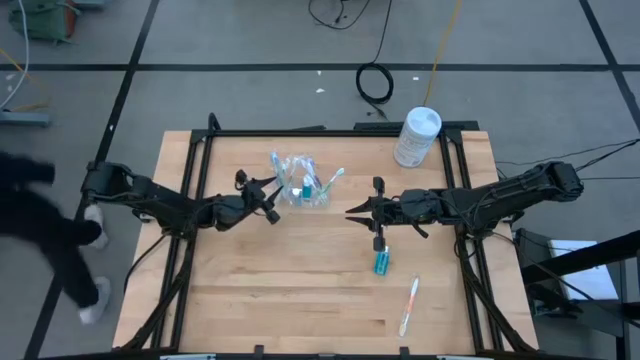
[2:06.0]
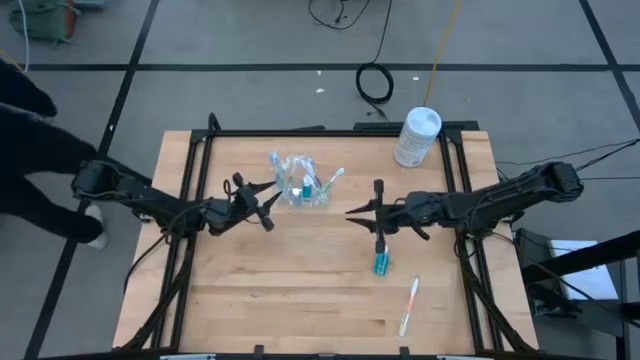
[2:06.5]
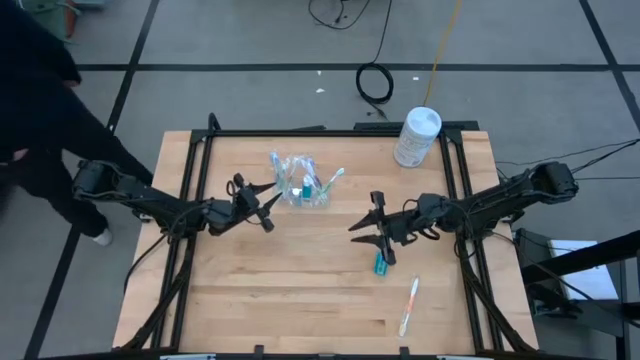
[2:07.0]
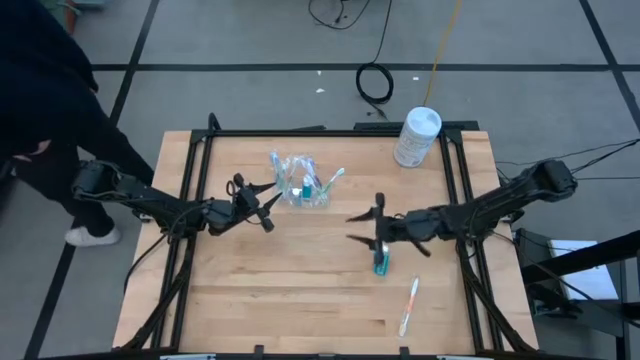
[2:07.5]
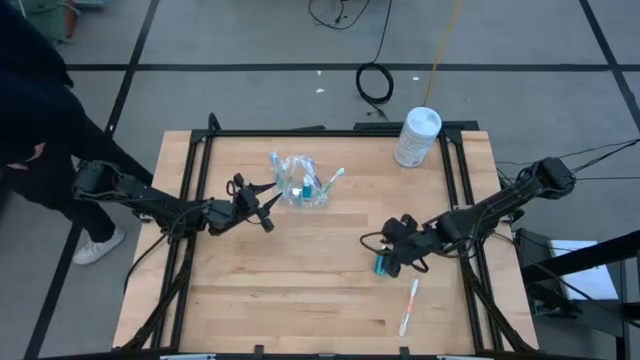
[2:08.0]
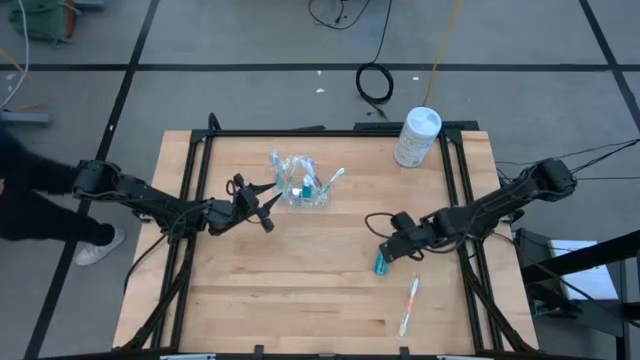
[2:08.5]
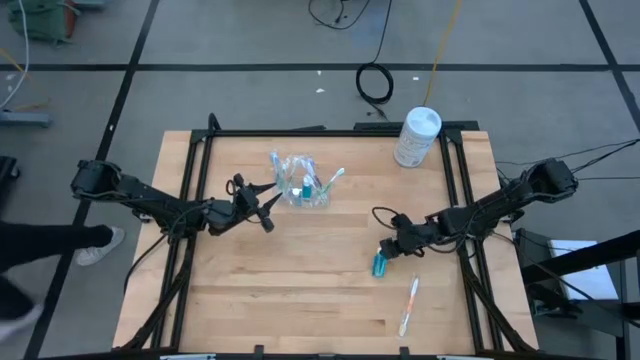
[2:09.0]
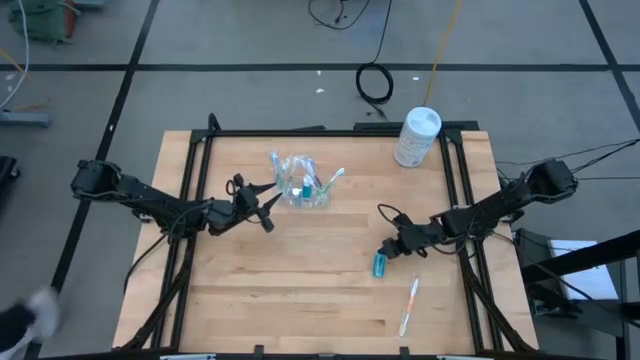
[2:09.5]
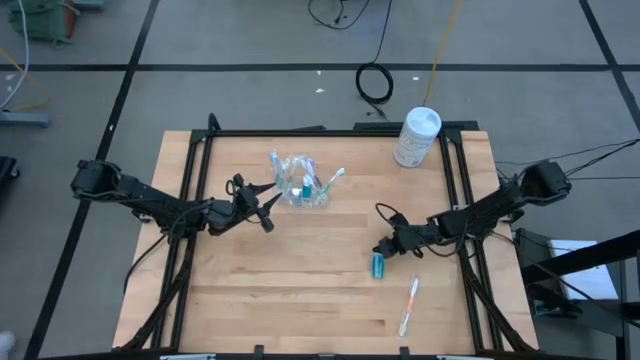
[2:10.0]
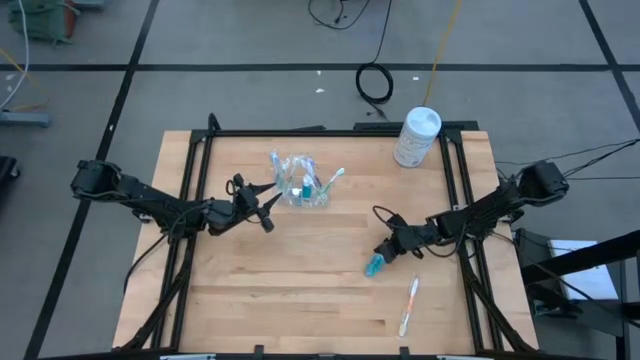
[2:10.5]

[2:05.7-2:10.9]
Task: Pick & Place toothbrushing station
Put the blue mouthwash into the transparent organizer

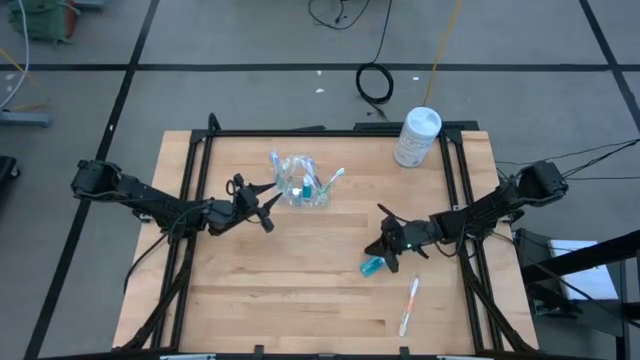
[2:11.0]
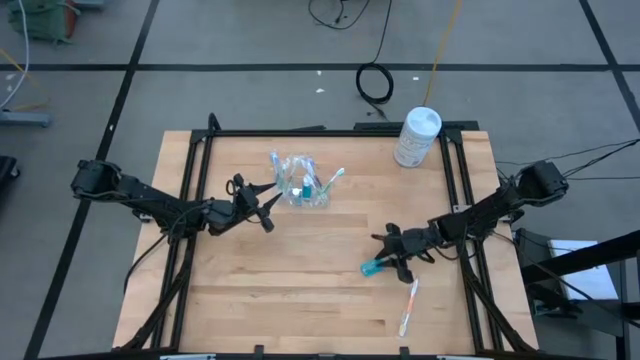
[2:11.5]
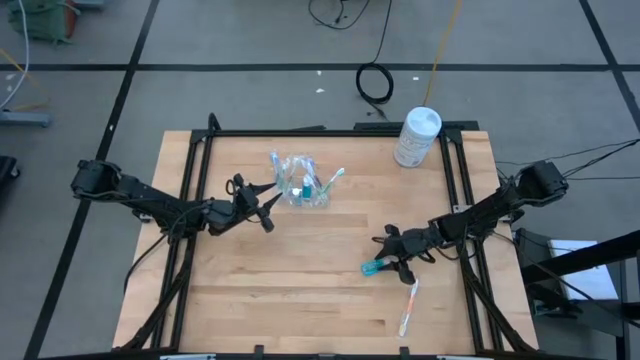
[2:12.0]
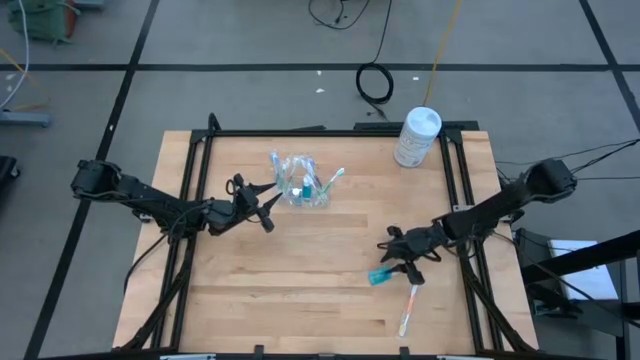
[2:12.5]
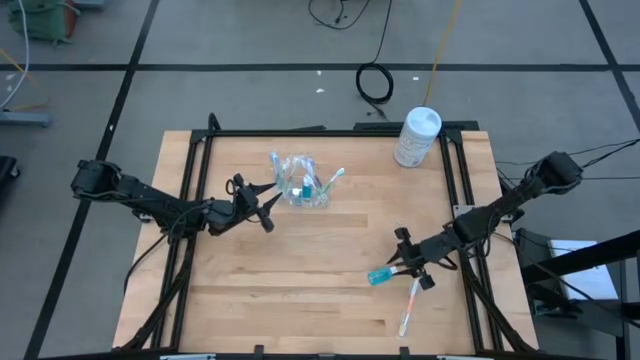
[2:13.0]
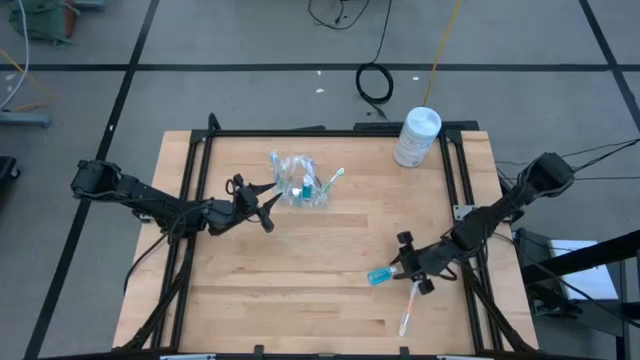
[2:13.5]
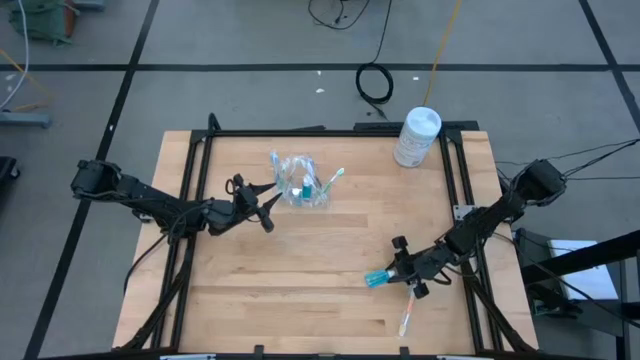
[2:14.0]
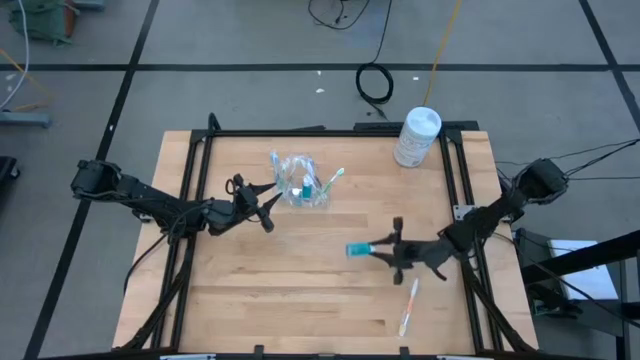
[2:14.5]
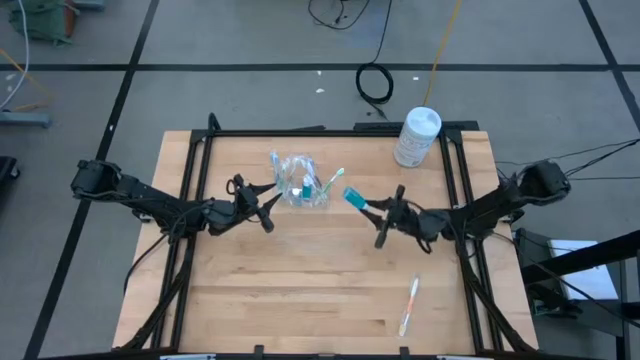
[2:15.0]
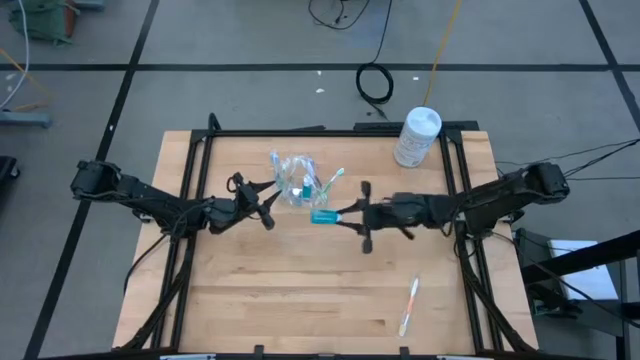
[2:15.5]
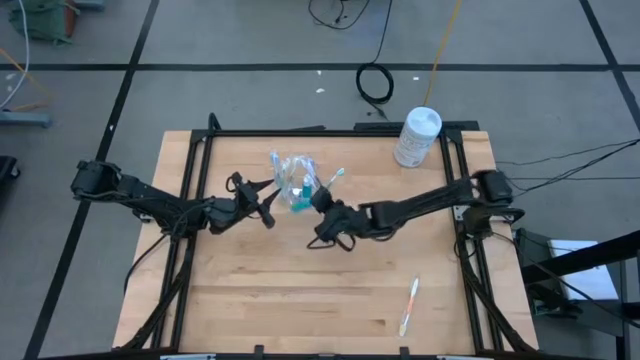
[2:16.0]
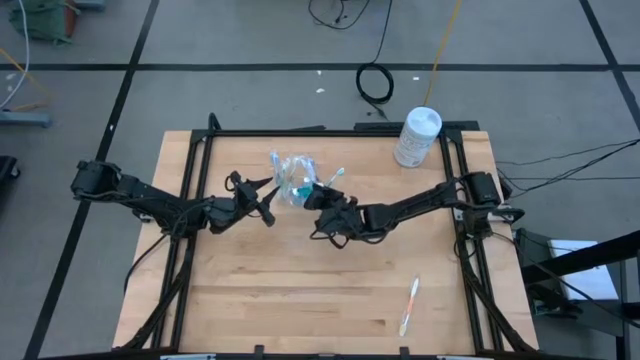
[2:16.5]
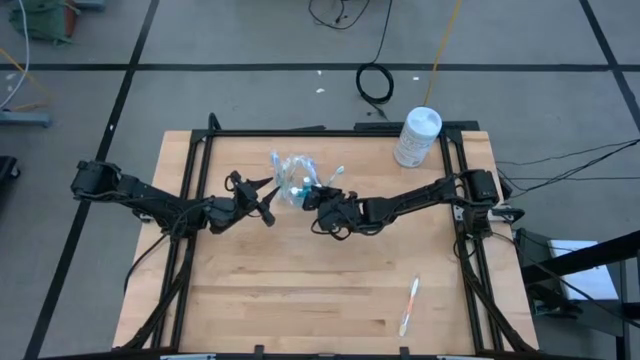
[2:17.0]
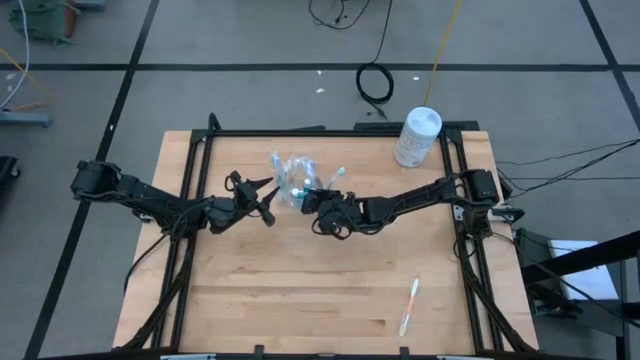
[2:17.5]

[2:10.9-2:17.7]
Put the blue mouthwash into the transparent organizer

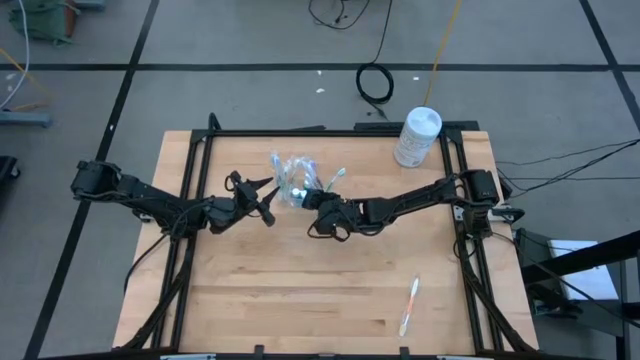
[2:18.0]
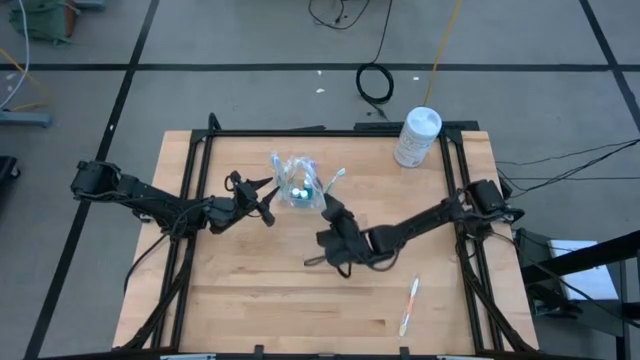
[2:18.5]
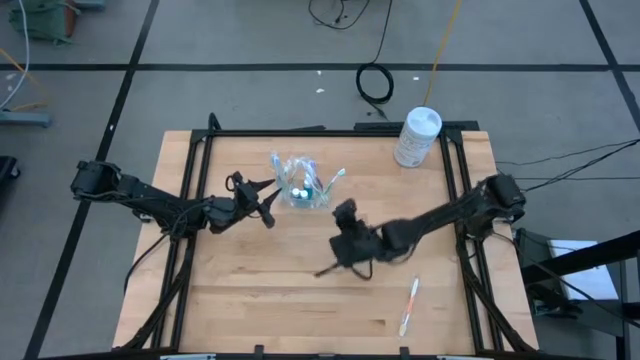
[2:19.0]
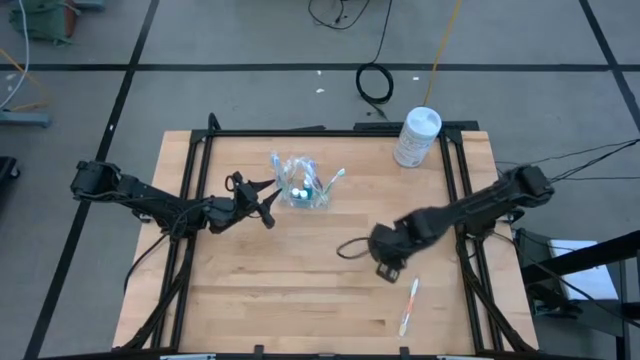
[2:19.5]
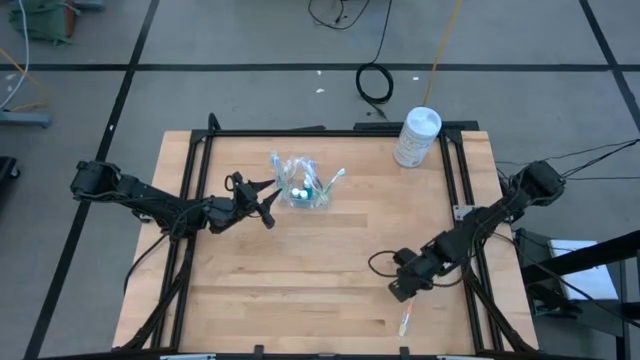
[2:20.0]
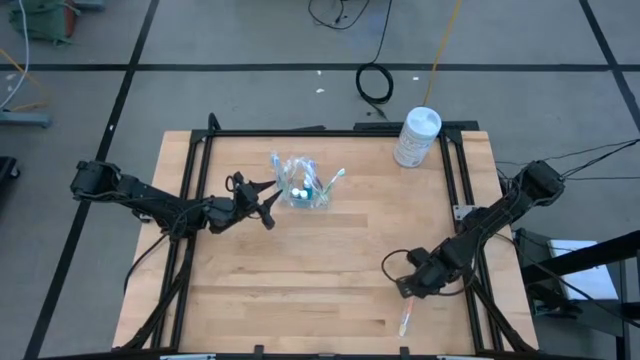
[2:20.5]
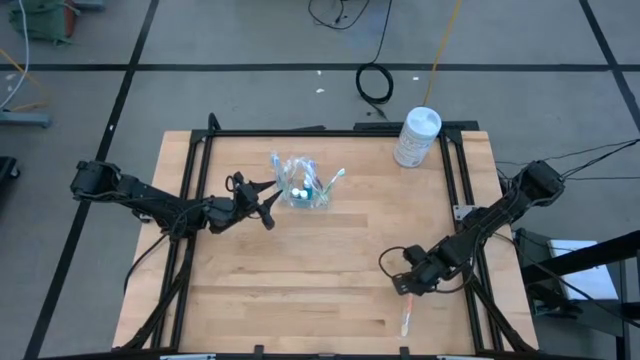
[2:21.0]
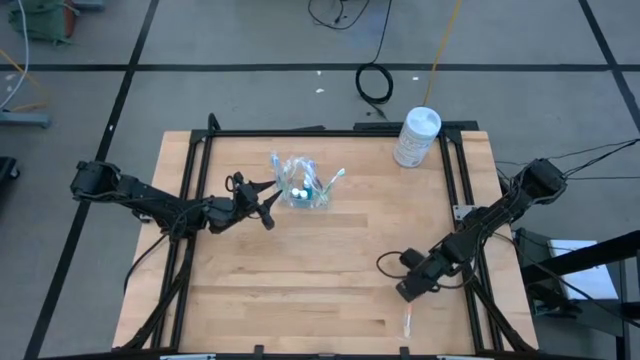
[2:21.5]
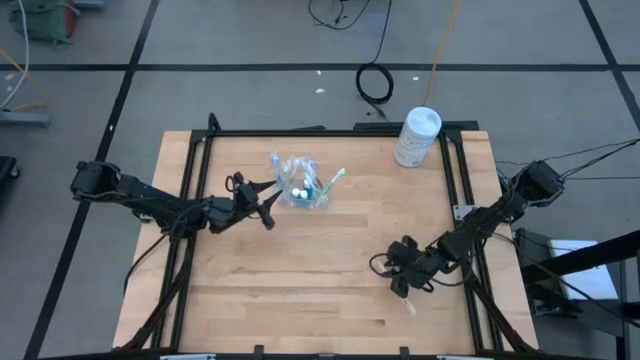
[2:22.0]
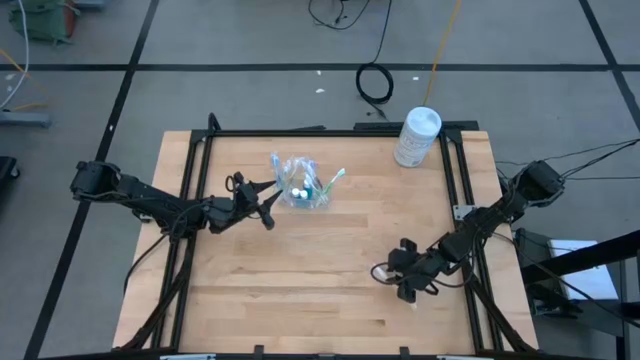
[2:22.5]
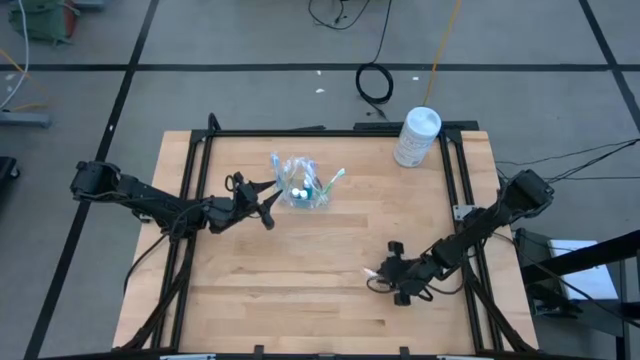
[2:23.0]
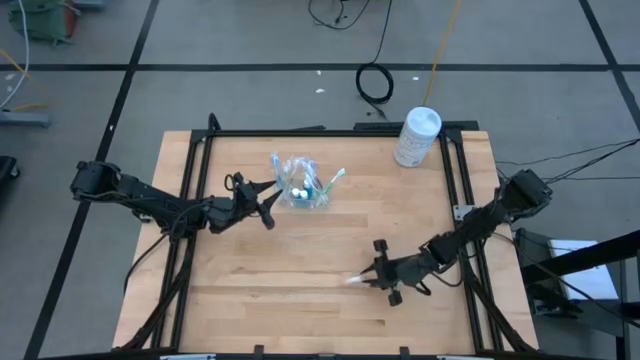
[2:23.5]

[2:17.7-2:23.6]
Put the orange toothbrush into the transparent organizer

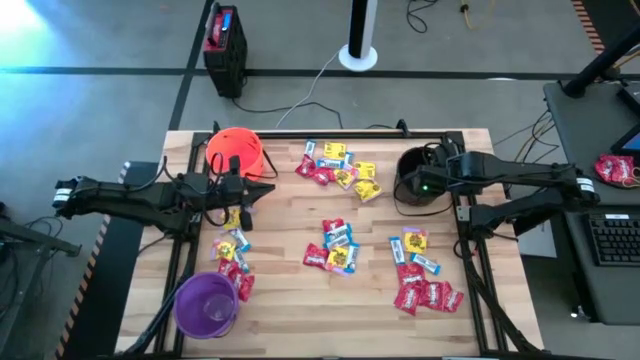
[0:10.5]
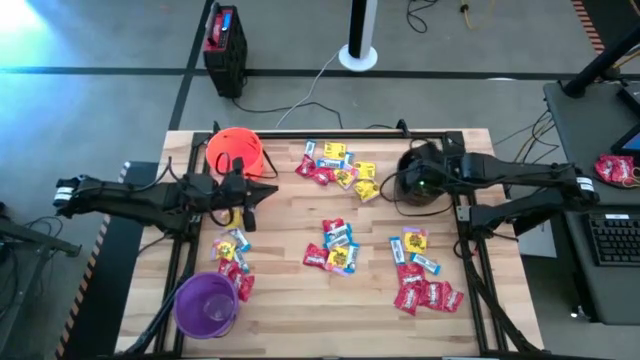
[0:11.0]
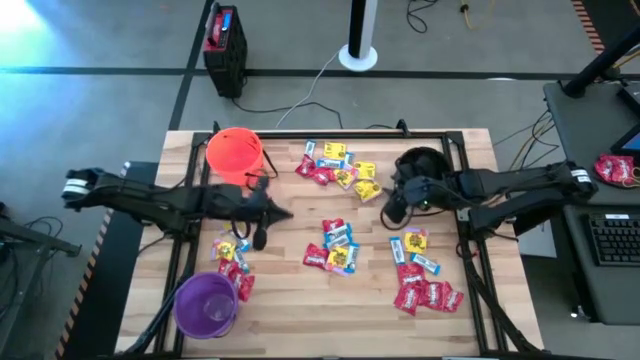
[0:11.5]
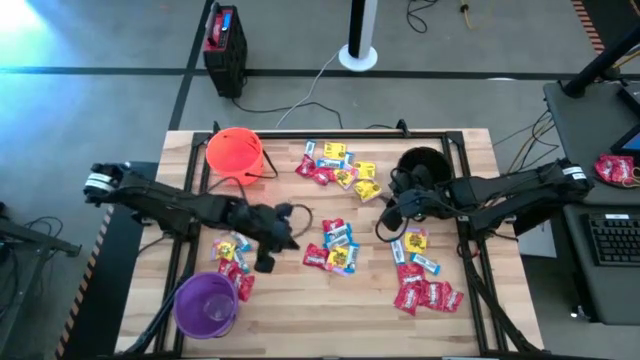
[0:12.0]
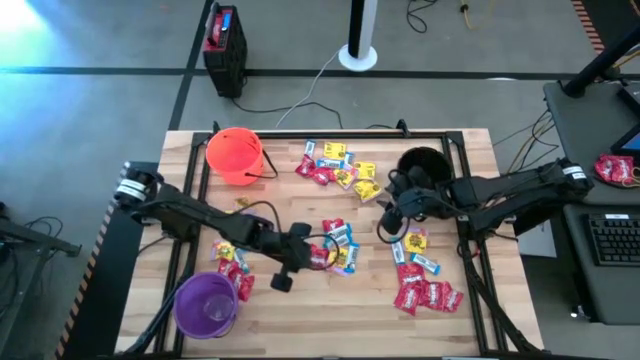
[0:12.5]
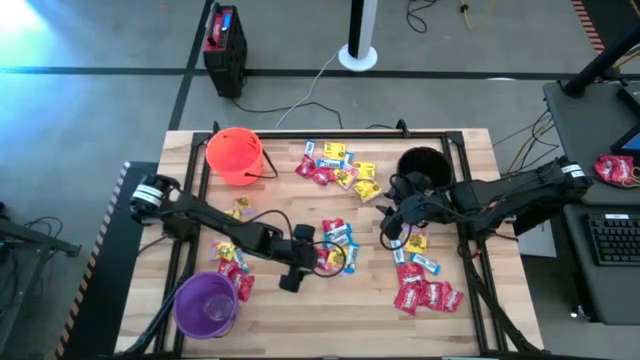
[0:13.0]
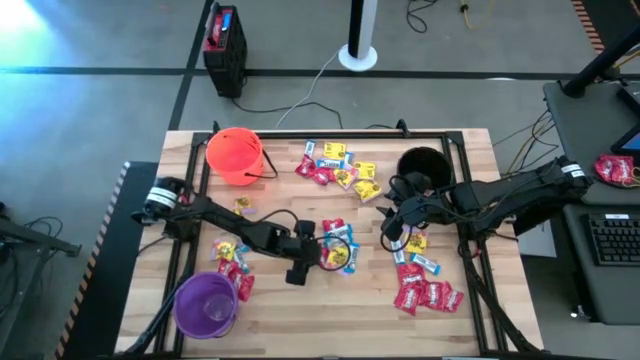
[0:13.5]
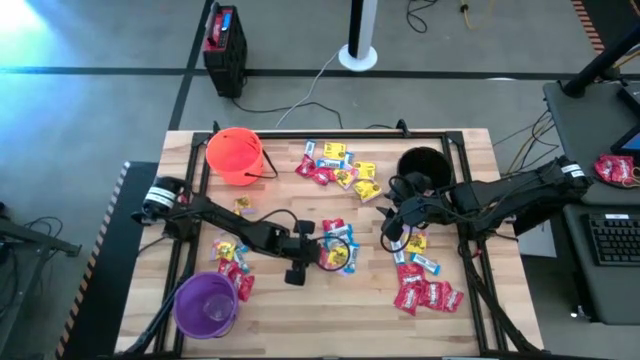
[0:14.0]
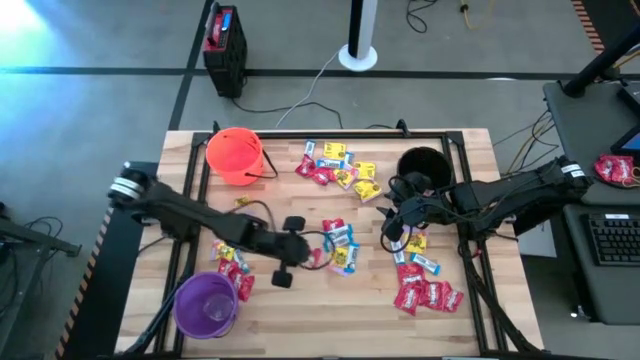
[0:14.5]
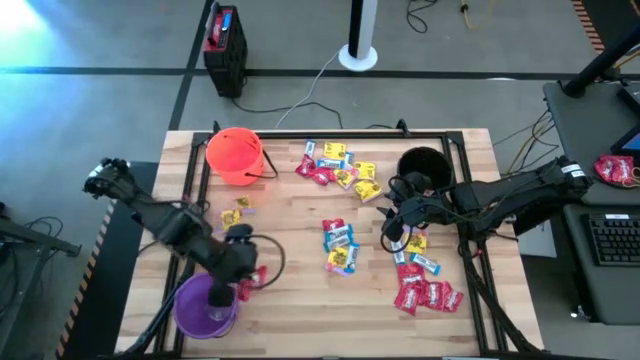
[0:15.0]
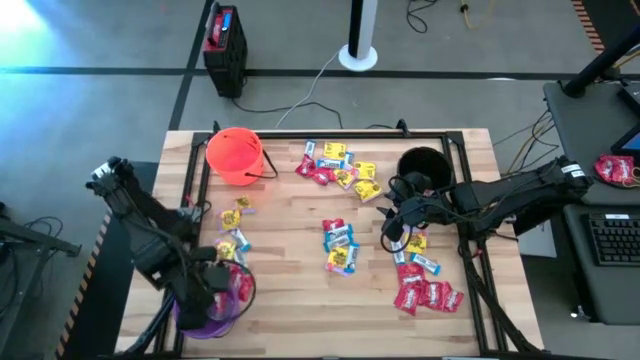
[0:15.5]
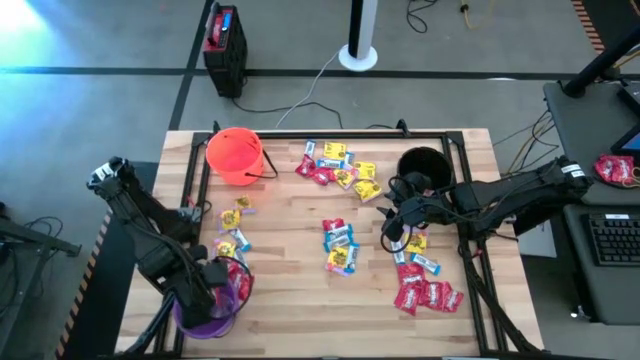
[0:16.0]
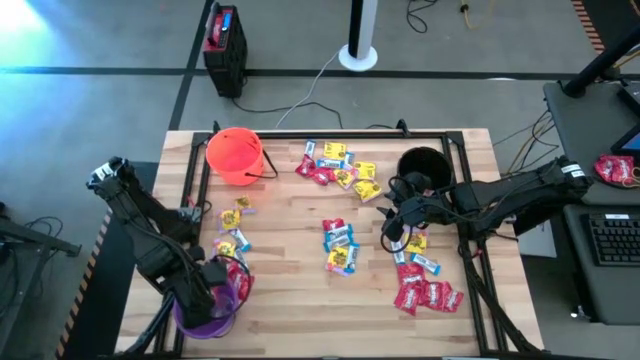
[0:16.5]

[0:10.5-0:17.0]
Task: Sort candy by brand, put in halloween buckets
Put the red candy into the purple bucket
